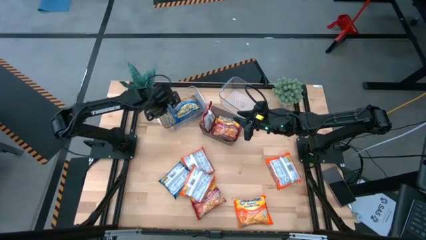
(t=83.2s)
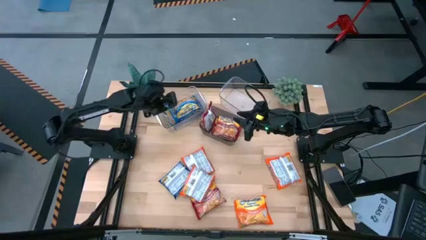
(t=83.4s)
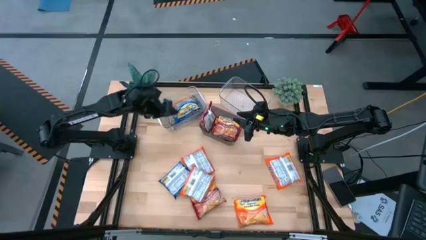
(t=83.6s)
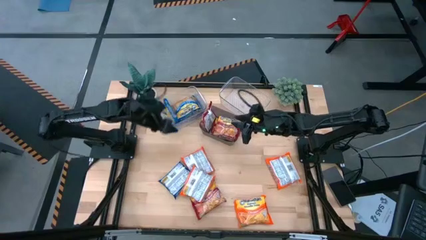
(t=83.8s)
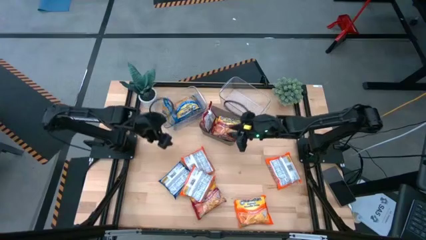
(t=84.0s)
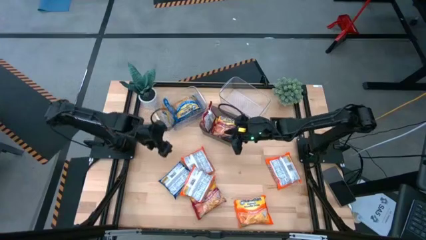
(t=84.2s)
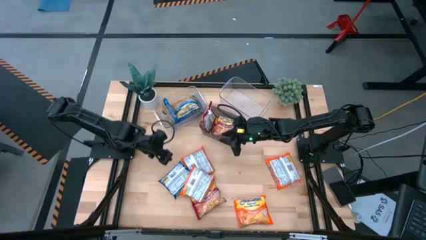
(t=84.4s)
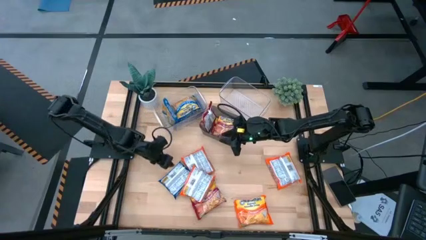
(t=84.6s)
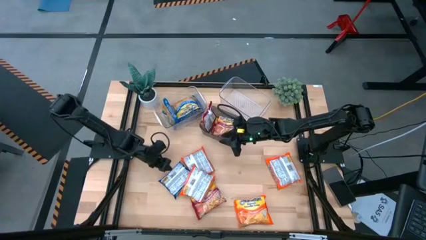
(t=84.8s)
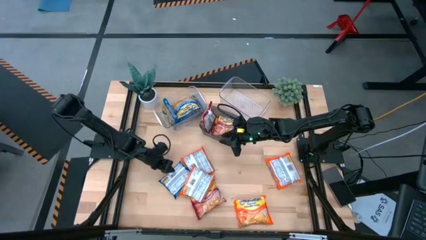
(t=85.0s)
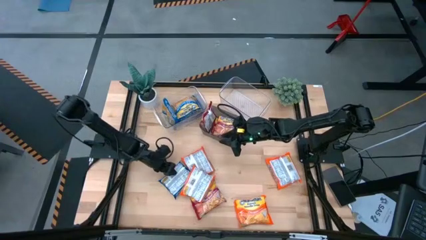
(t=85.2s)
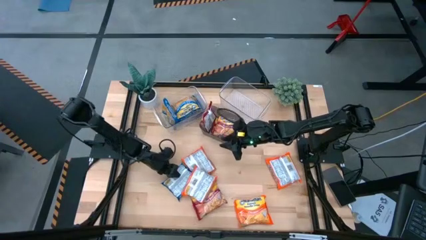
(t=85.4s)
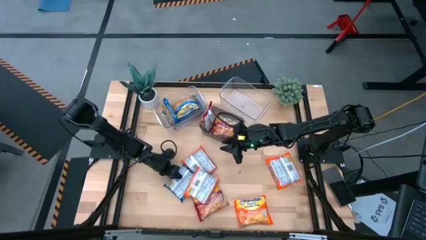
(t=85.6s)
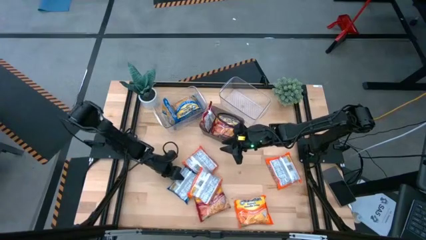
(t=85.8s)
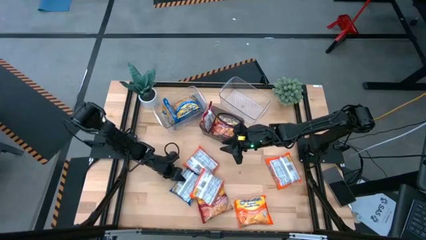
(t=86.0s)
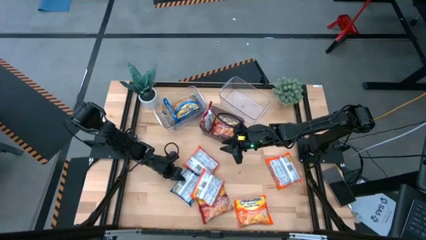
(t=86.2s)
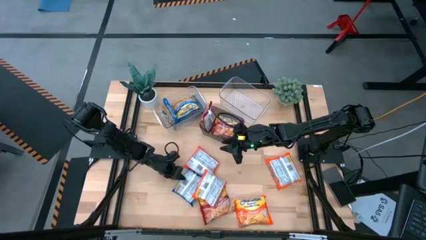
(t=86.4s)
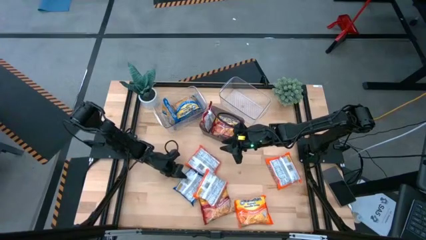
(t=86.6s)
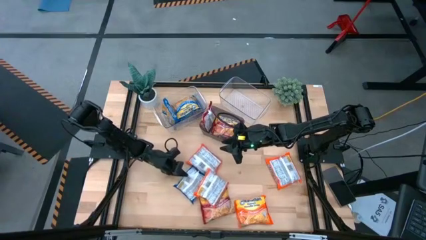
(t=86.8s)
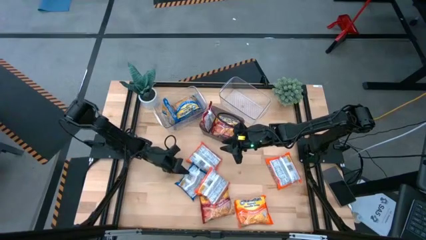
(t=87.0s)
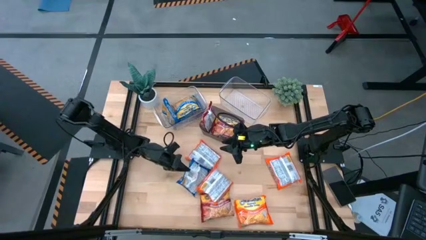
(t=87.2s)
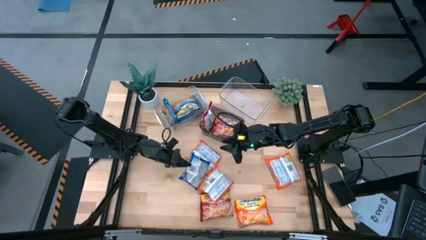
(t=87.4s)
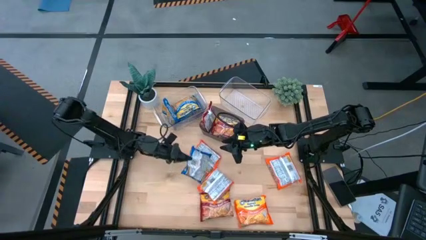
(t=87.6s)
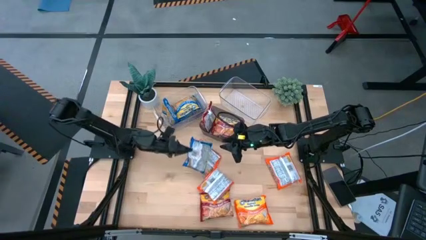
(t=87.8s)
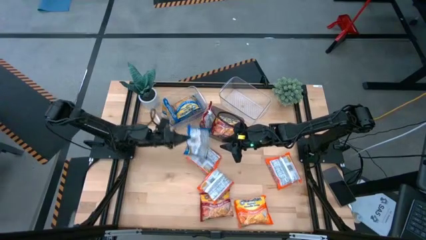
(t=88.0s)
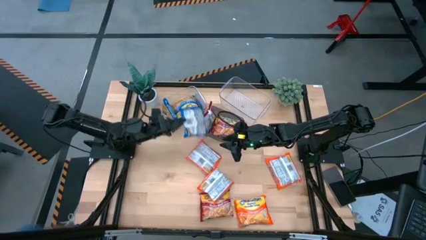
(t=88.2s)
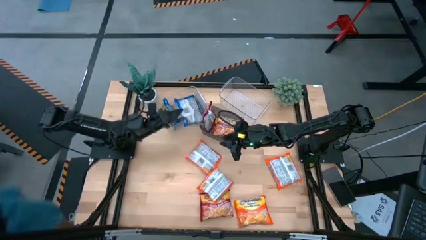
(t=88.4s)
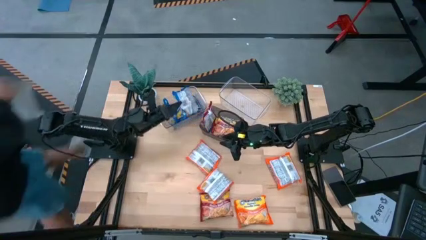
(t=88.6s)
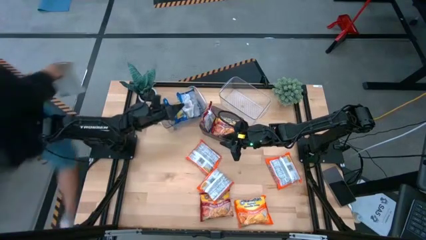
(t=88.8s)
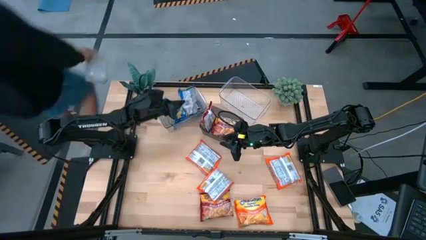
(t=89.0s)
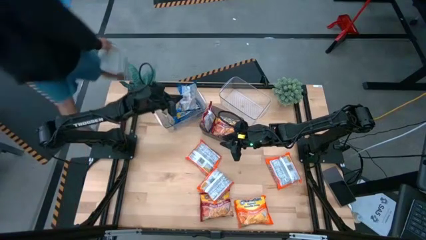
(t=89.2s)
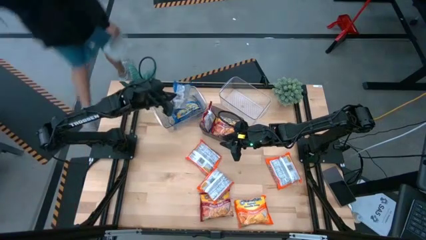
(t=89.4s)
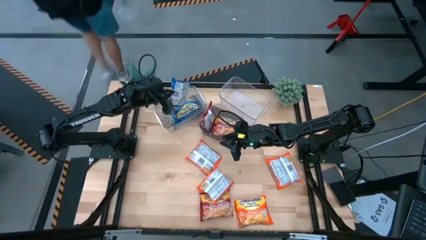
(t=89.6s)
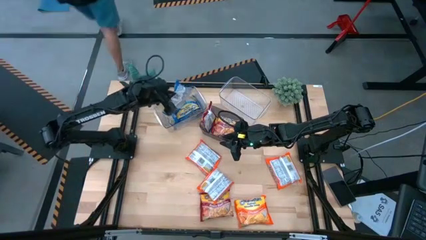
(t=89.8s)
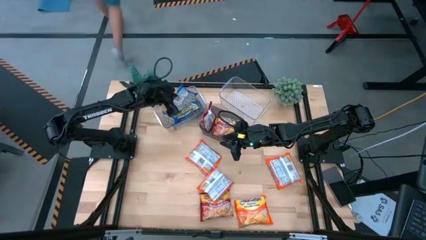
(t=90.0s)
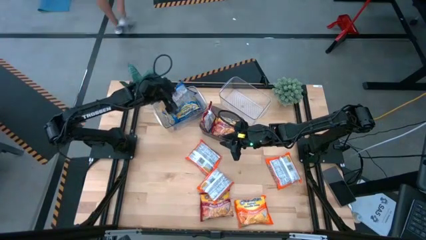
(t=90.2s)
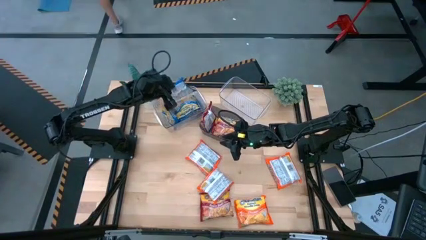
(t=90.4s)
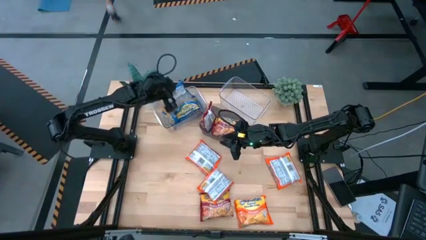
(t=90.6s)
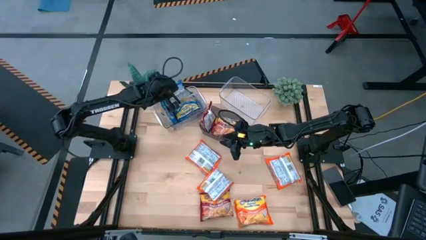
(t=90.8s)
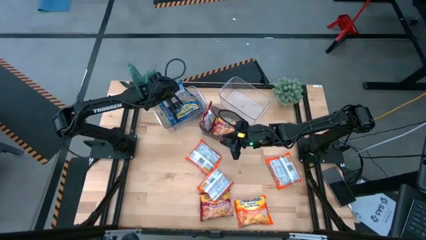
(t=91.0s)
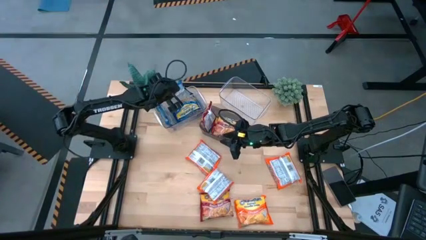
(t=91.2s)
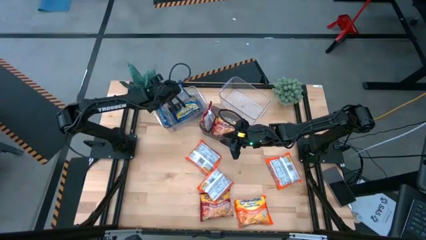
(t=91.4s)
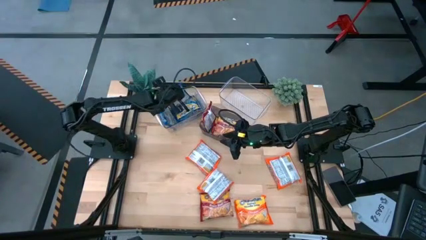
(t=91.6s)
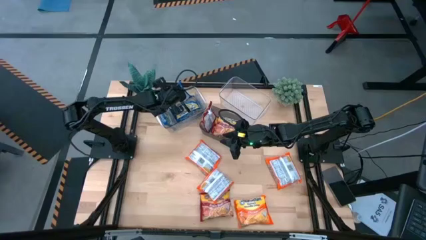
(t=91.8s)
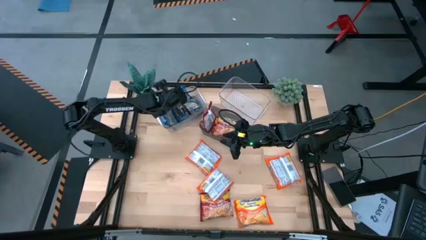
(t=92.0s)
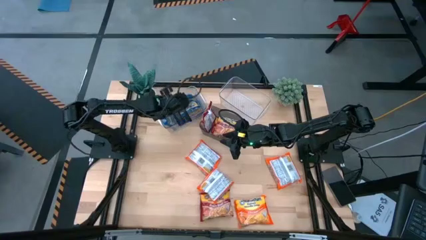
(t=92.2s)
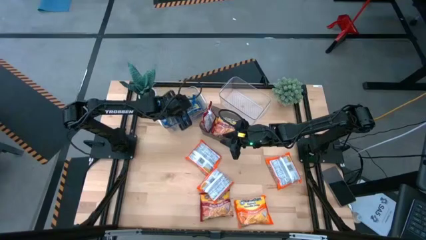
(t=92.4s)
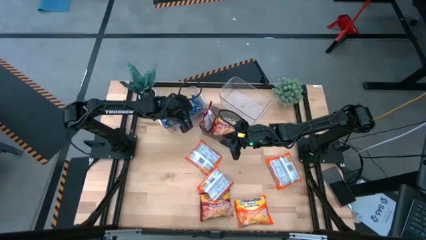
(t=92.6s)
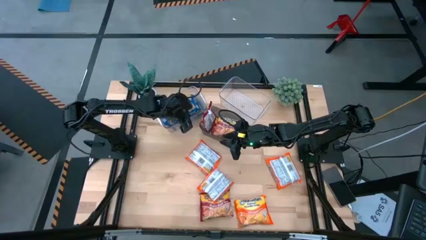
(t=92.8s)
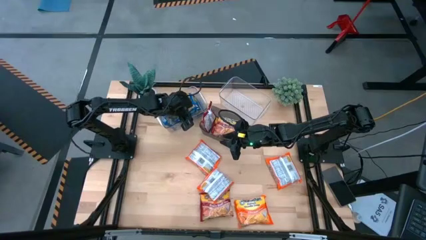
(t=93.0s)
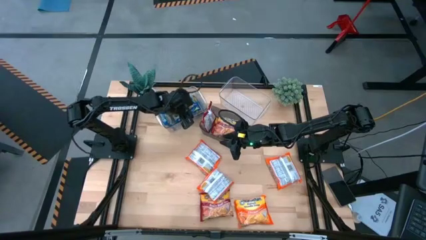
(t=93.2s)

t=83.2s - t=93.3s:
Task: Sort Maruchan noodles
Stack the blue noodle pack on top of the blue noodle pack

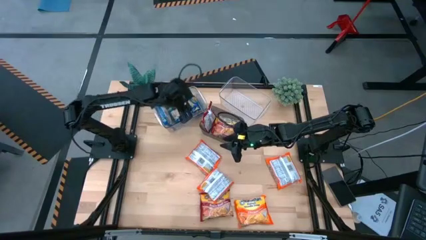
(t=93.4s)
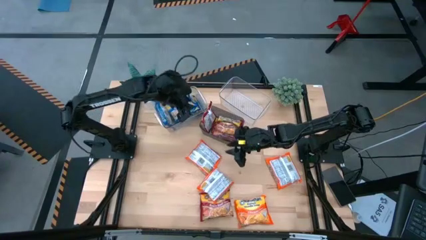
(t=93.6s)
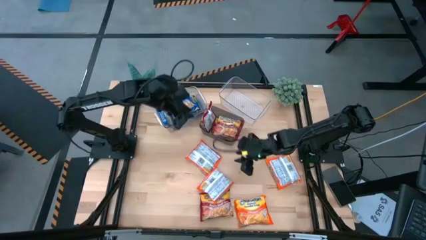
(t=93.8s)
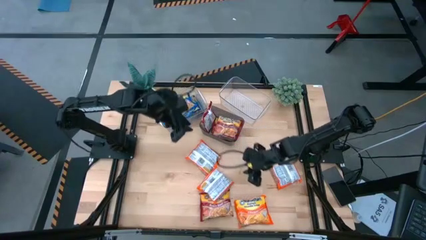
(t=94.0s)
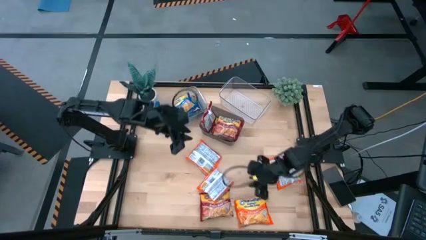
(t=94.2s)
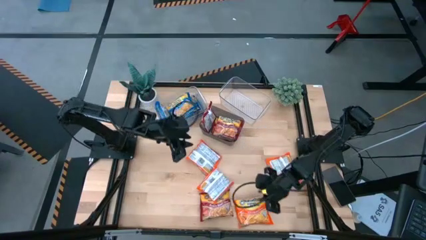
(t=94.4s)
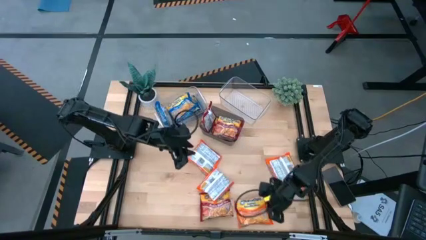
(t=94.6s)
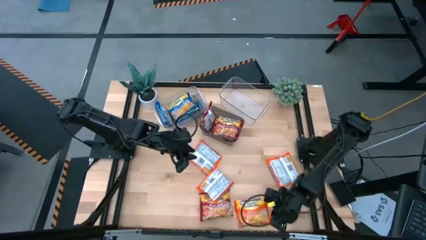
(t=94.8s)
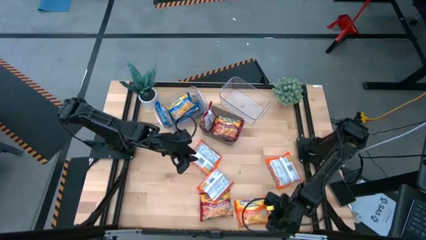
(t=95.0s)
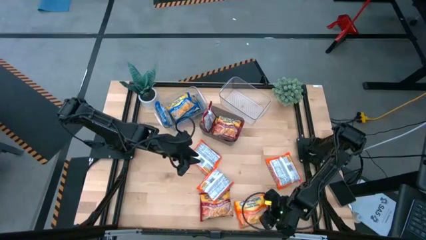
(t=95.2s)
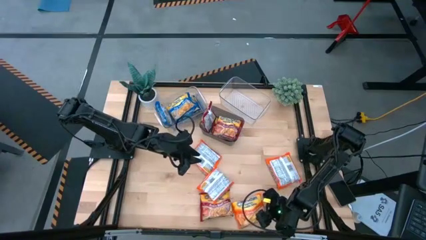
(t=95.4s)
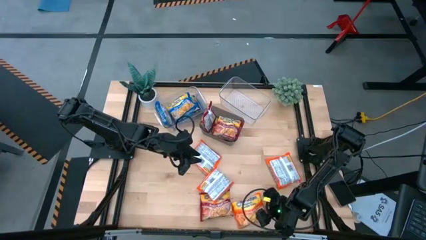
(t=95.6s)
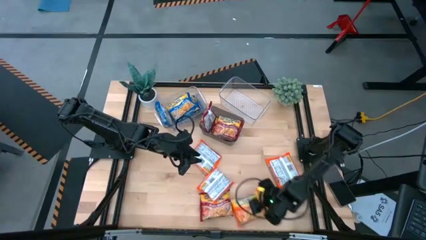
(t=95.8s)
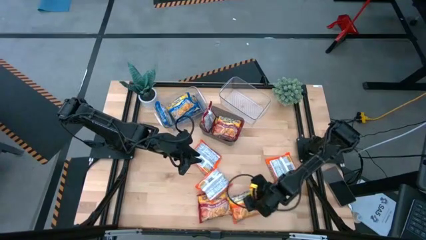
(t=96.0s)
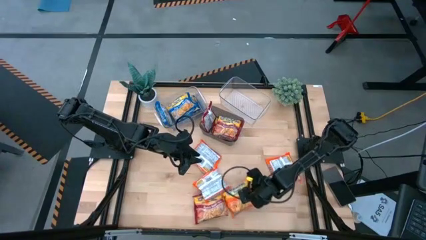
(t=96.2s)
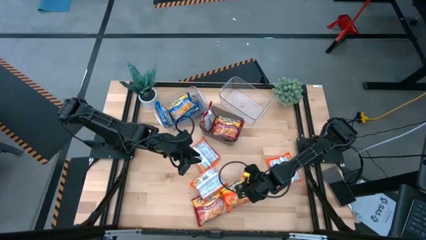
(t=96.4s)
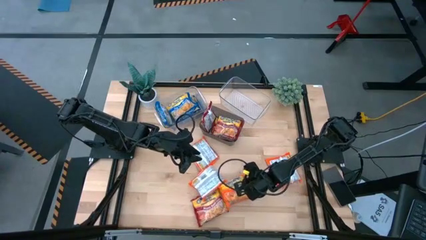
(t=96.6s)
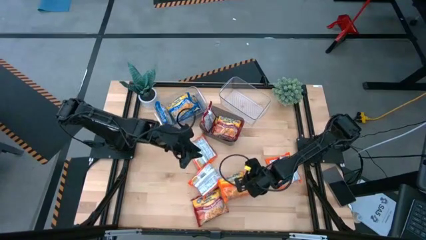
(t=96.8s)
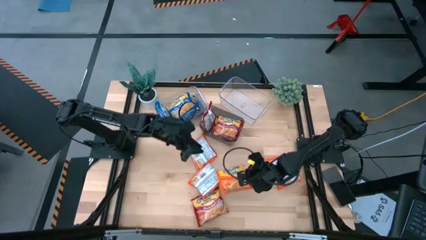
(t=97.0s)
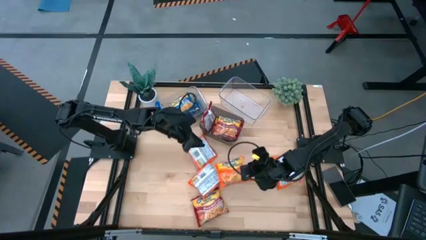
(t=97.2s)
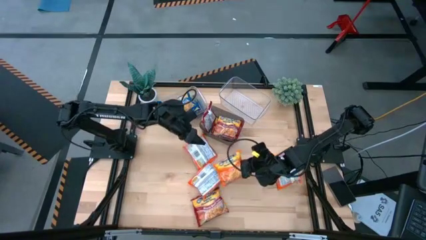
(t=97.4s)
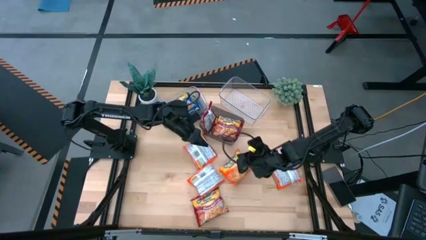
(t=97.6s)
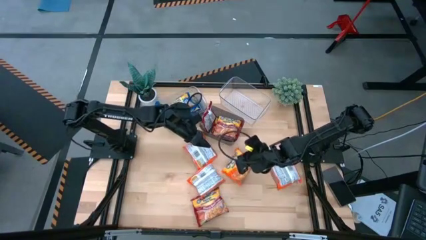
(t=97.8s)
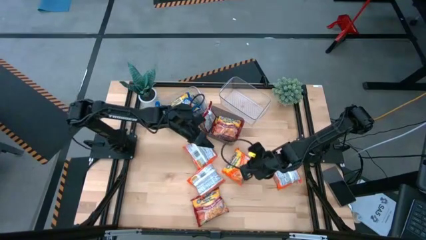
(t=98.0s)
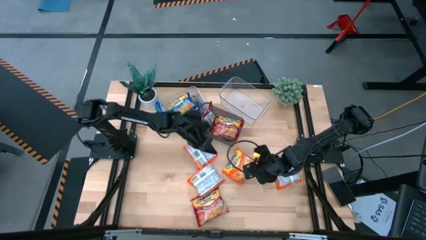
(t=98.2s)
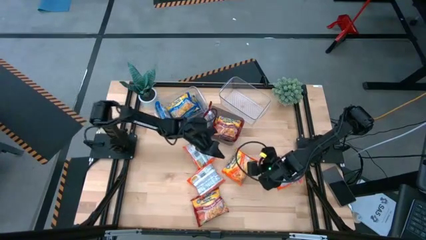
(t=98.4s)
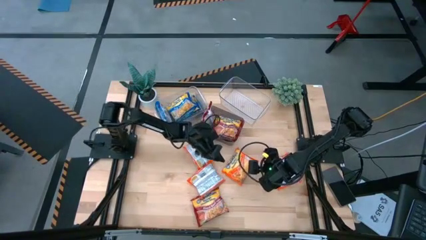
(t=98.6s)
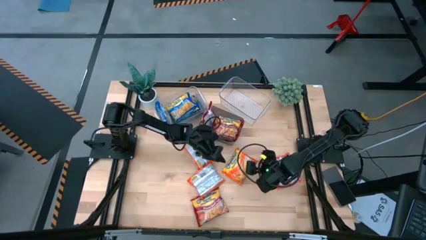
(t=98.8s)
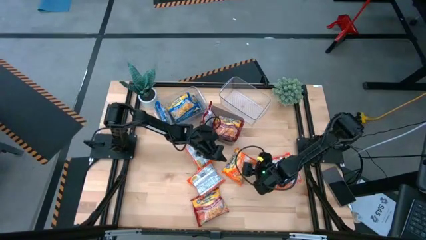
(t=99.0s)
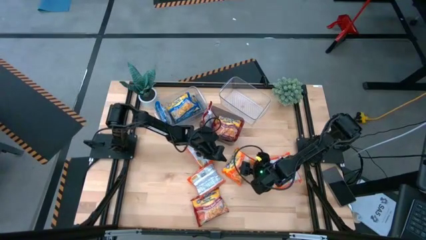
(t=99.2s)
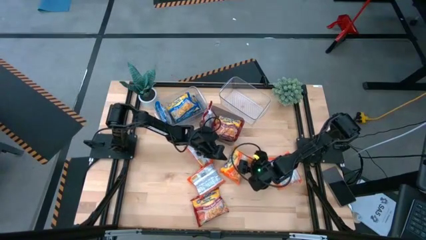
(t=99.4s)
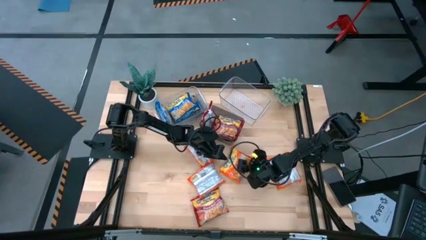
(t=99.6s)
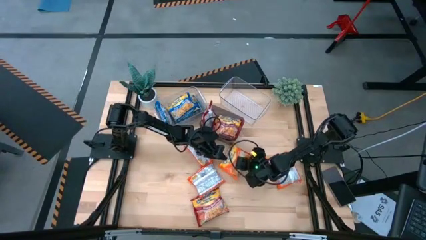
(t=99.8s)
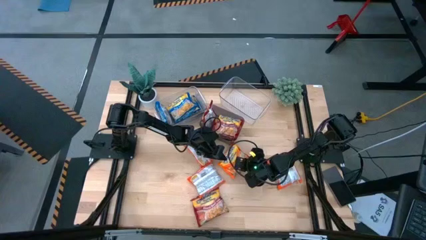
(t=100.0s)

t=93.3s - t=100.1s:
Put the orange noodle pack into the right transparent bin
